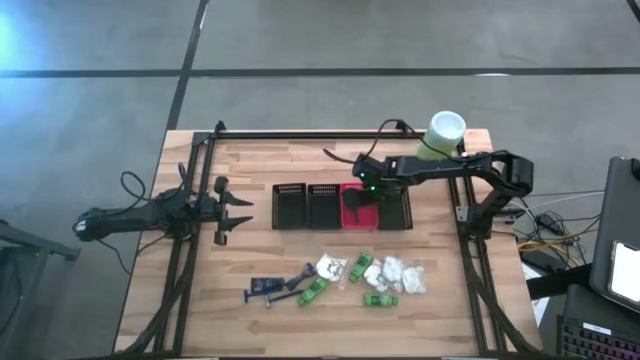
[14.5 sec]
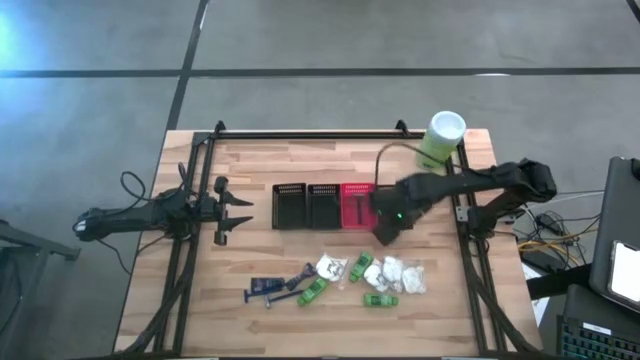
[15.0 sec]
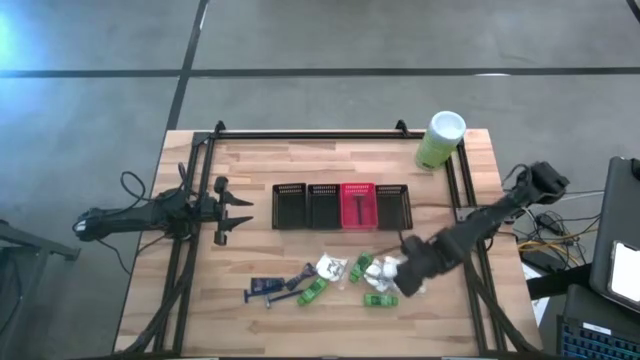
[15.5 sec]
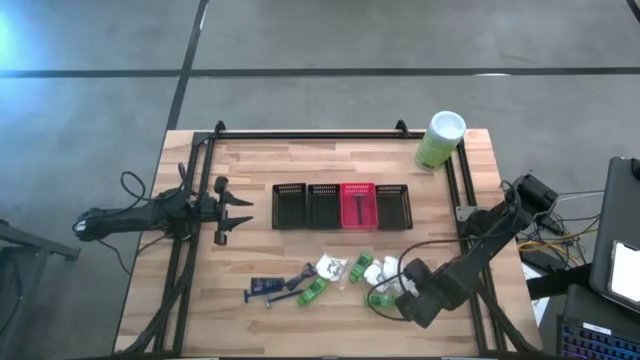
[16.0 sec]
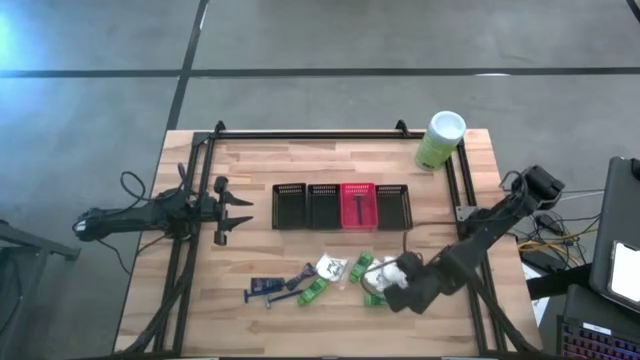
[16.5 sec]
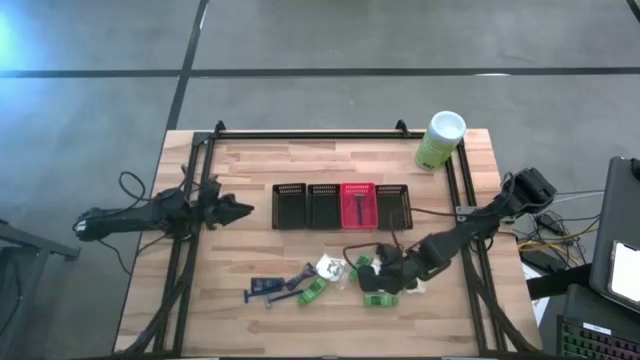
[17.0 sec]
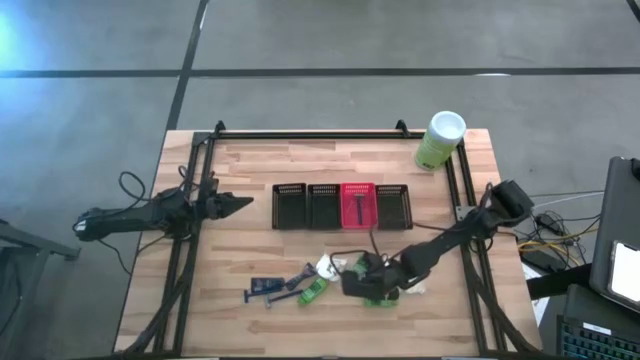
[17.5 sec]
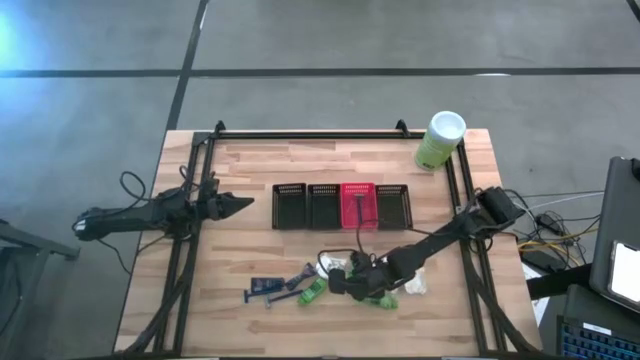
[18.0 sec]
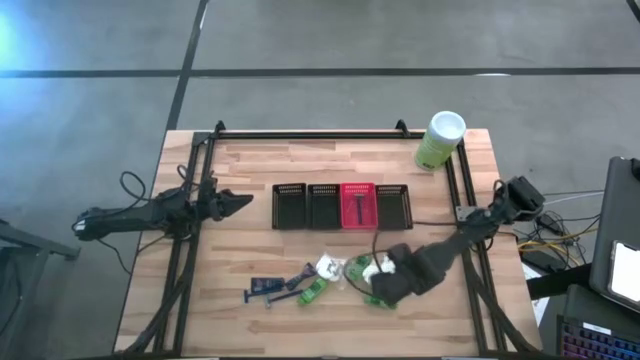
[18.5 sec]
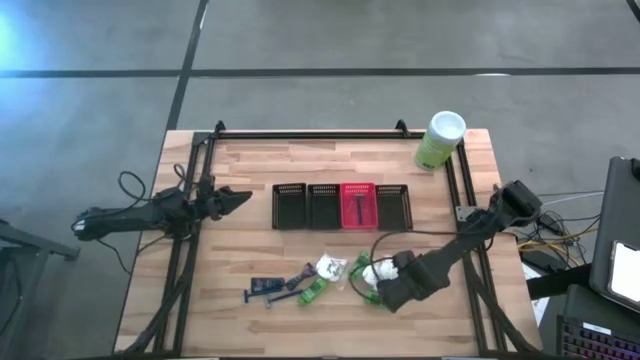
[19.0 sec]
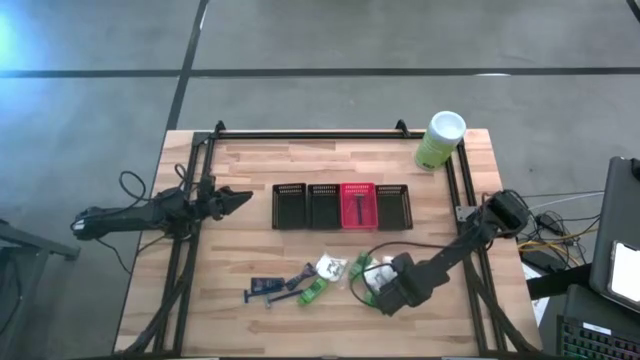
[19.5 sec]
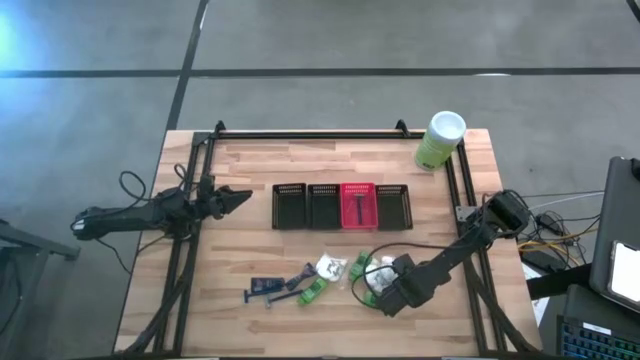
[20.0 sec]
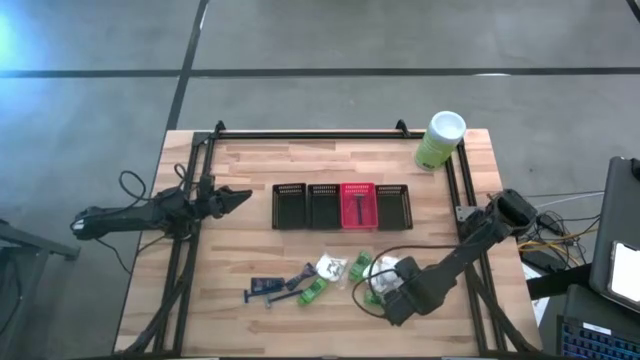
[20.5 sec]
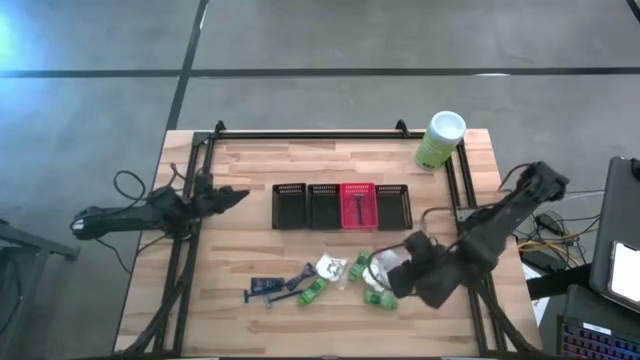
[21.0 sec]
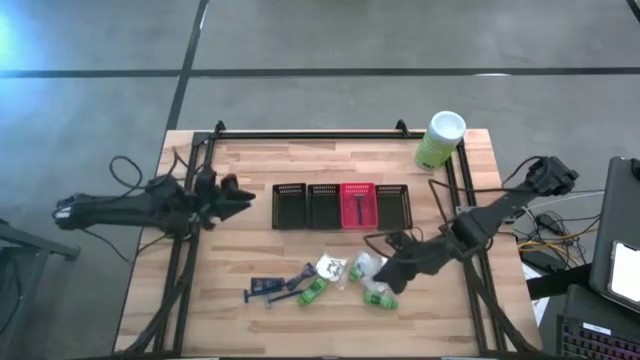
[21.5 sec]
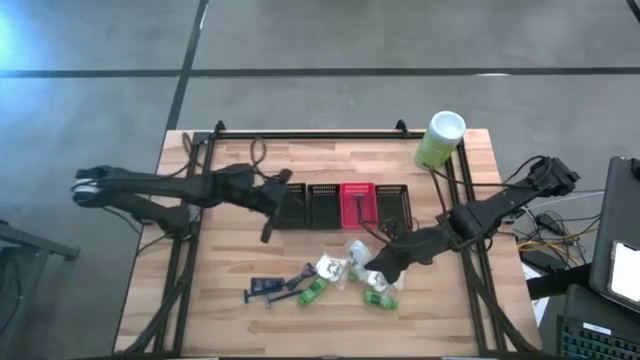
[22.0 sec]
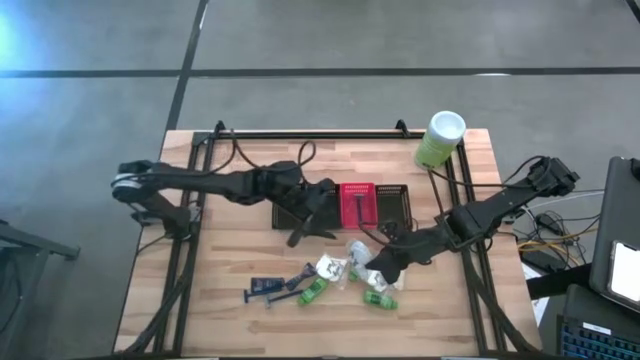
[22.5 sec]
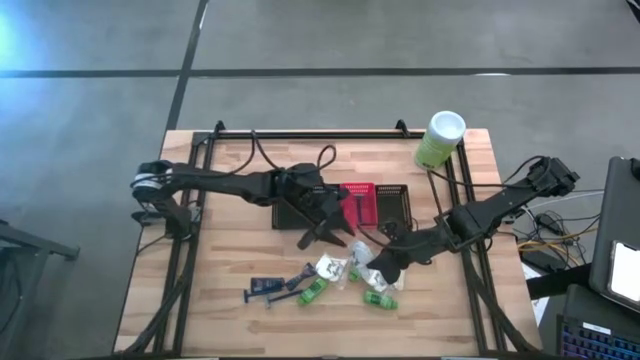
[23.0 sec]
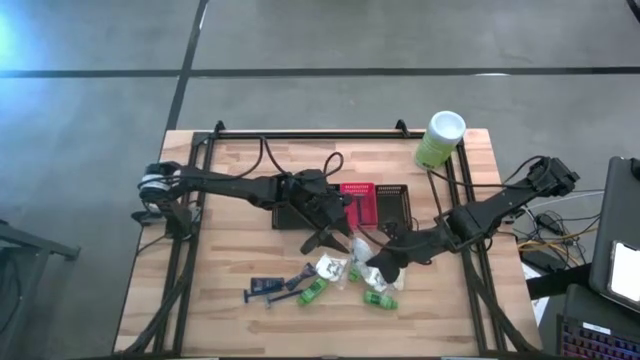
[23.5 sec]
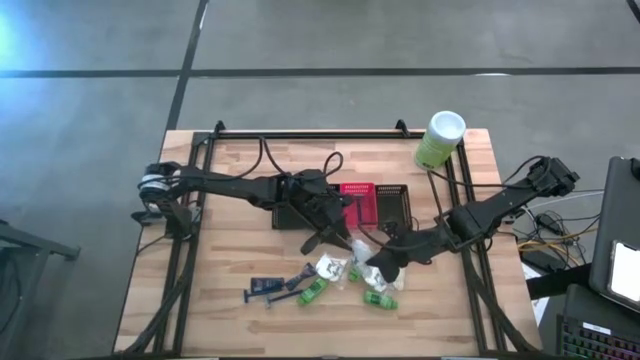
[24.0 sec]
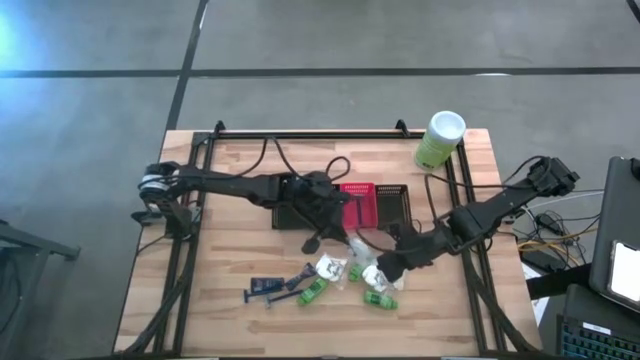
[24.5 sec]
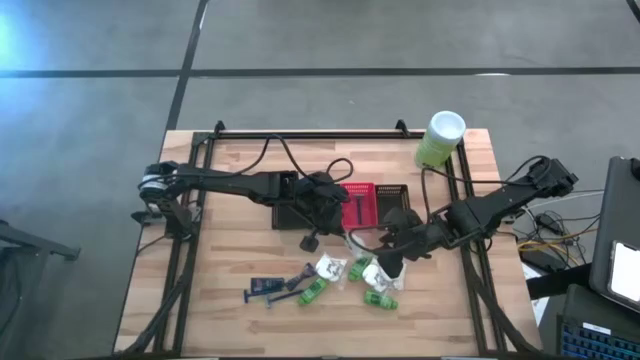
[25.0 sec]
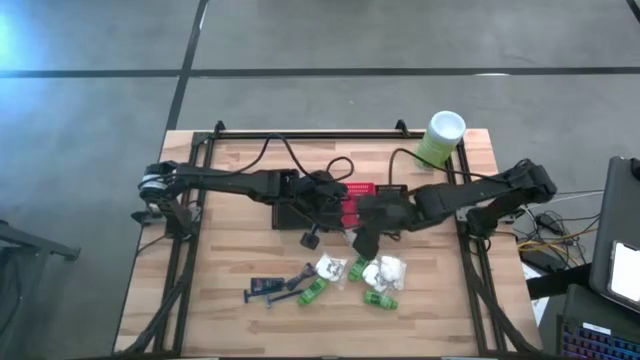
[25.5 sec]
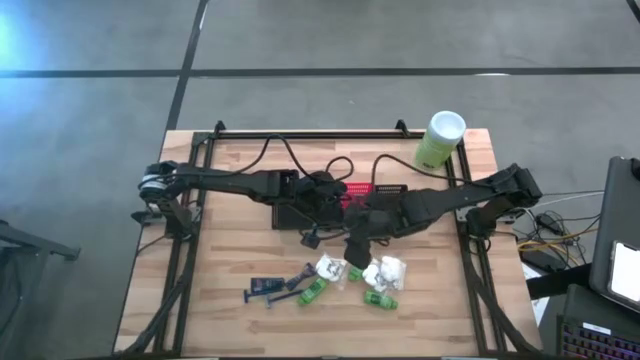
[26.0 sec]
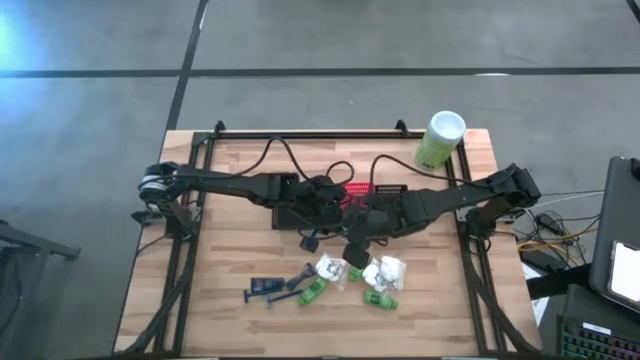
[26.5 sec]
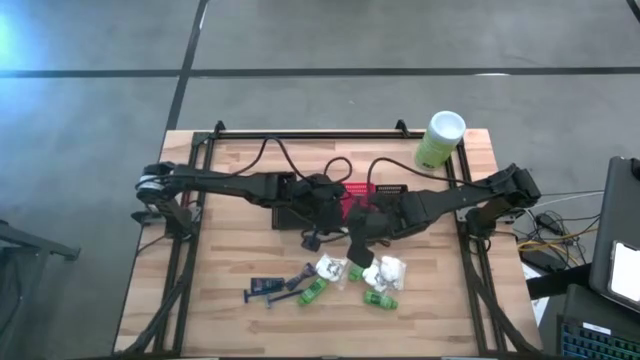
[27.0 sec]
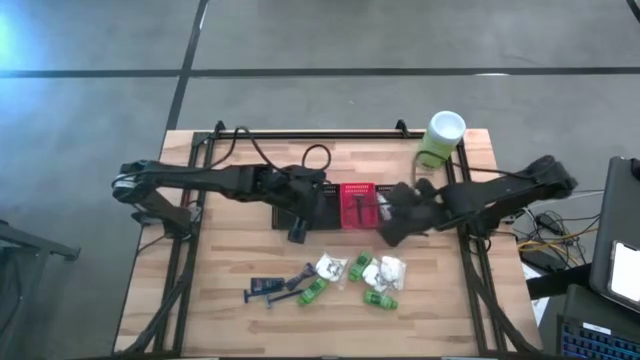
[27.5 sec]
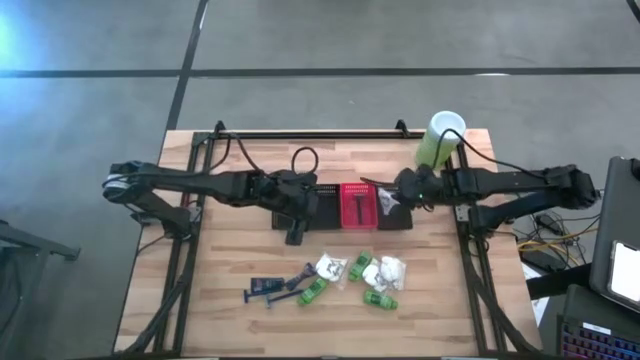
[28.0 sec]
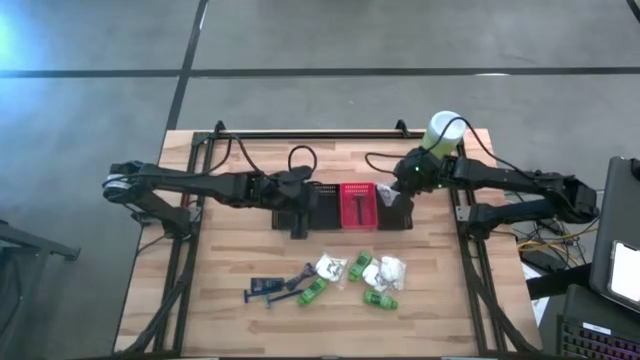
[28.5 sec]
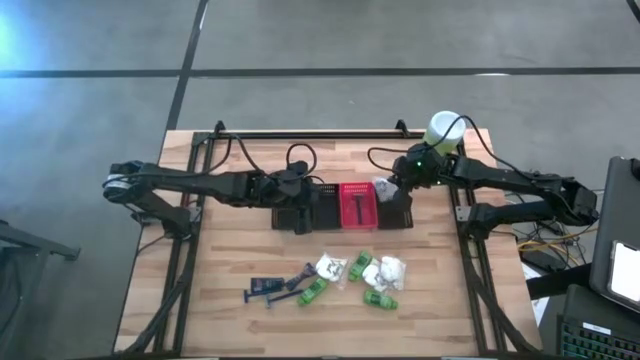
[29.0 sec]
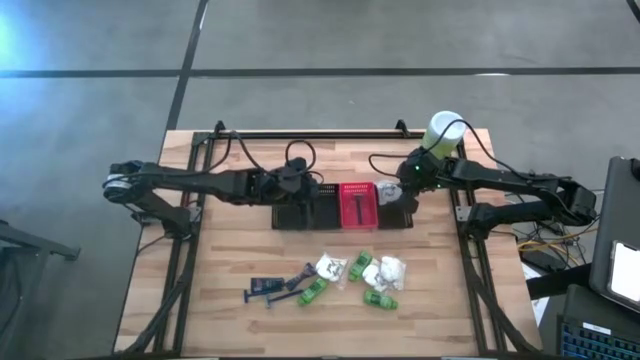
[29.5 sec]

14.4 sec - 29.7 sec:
Task: Pick & Place Travel size toiletries
Put the white cotton pack into the right black basket

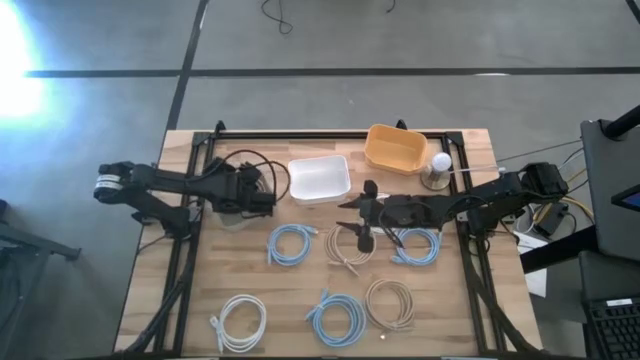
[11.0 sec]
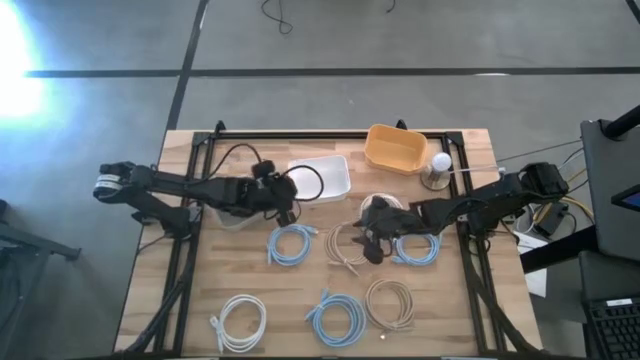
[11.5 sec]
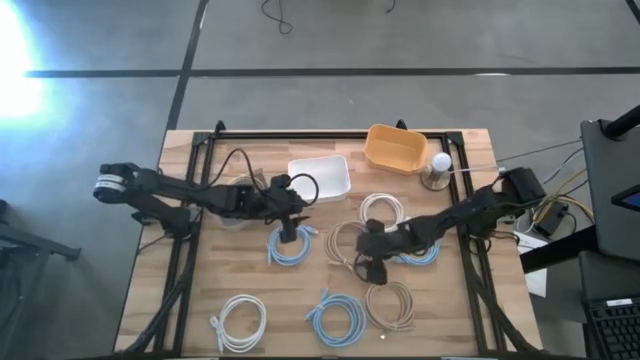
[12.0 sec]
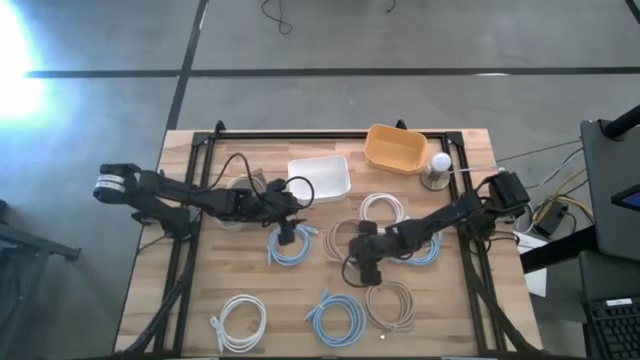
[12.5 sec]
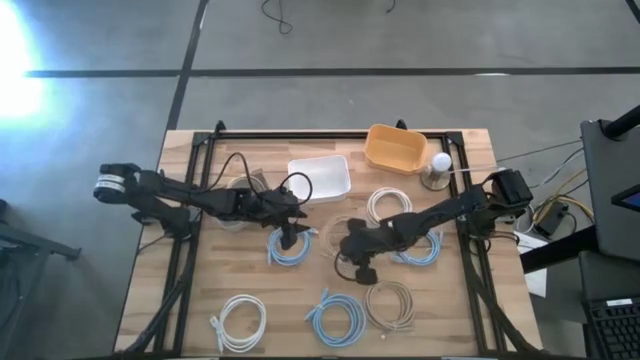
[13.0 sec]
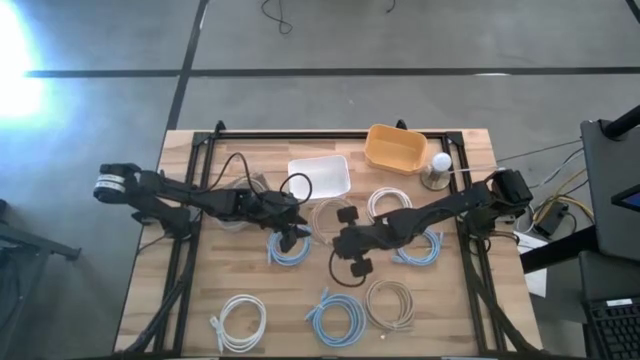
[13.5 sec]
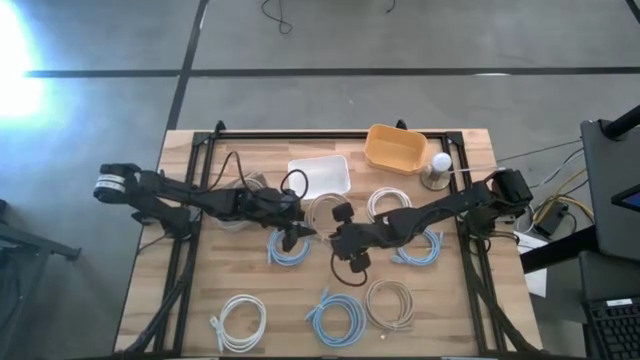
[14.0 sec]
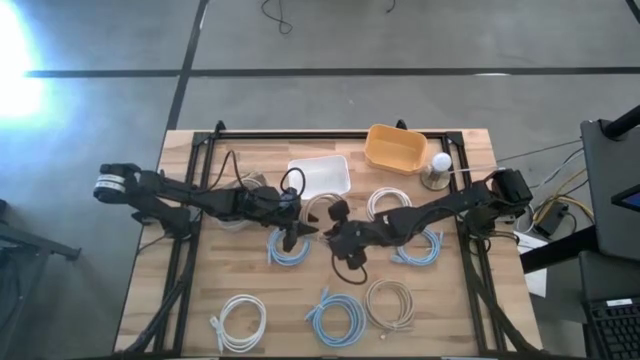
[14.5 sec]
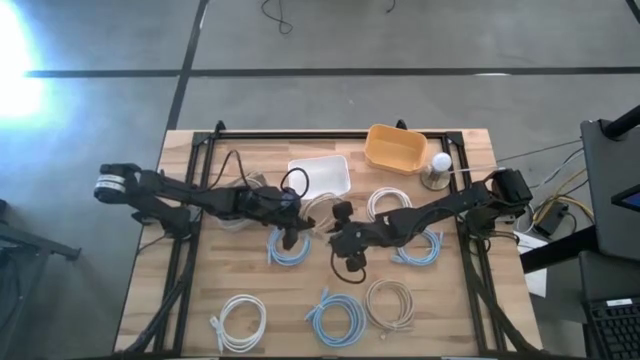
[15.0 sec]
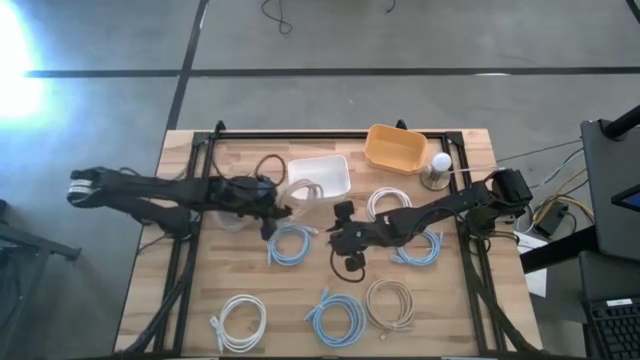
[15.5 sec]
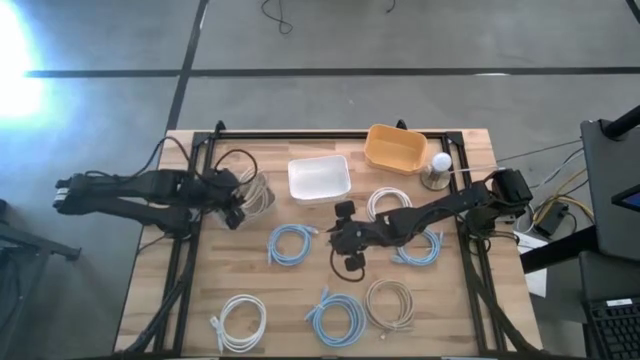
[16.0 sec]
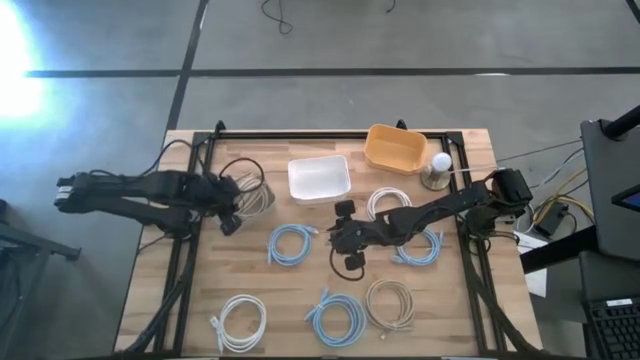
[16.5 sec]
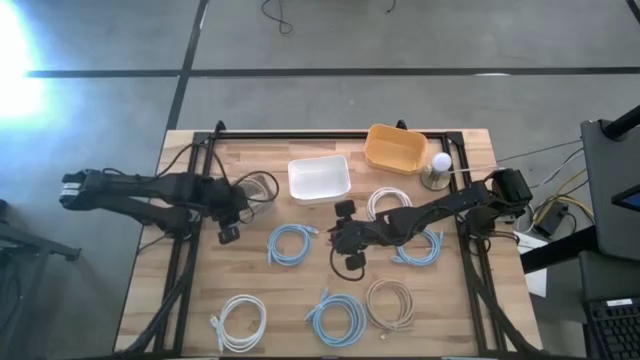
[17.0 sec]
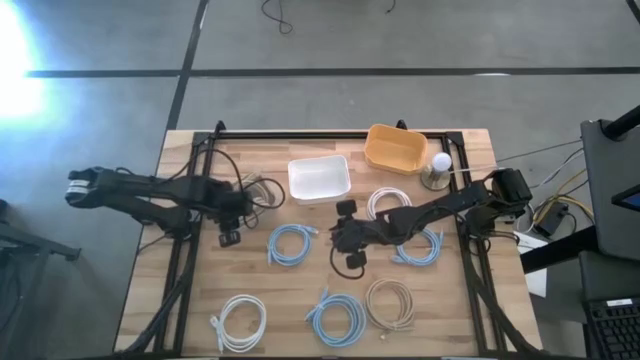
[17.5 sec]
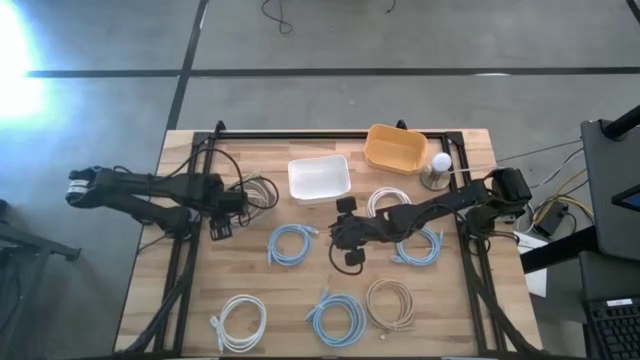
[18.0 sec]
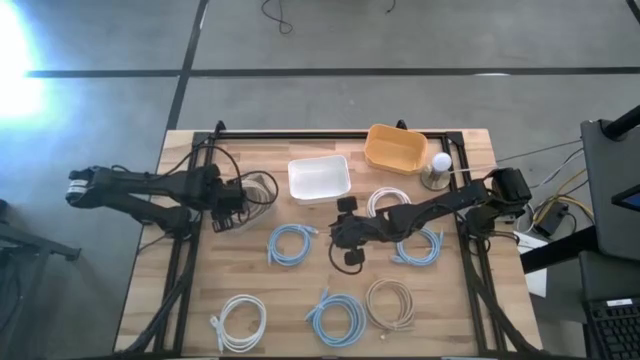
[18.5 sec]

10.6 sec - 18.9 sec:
Task: Sort HDMI cables
Put the top brown HDMI cable into the gray bin
